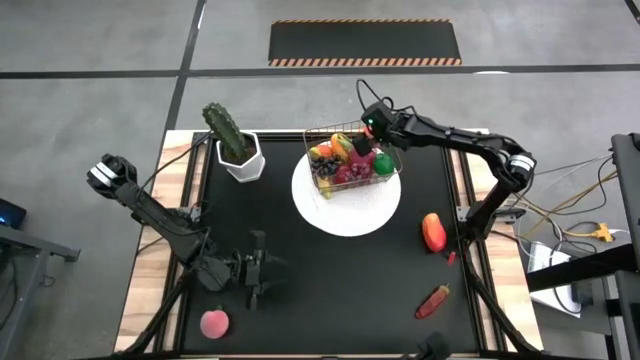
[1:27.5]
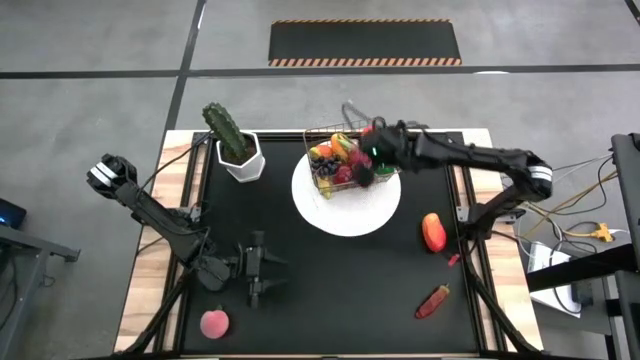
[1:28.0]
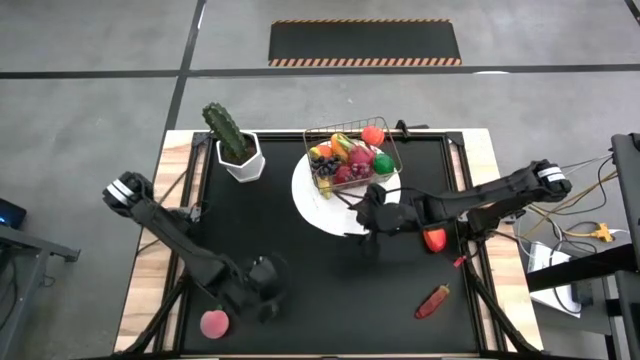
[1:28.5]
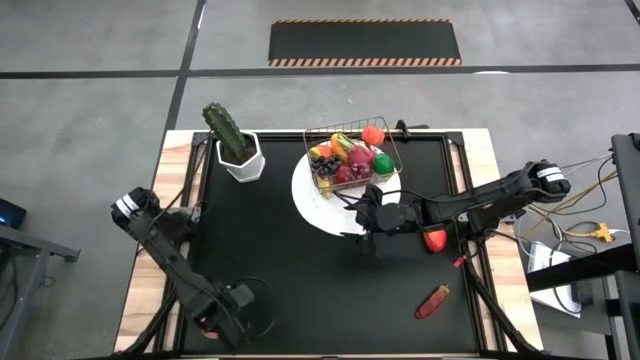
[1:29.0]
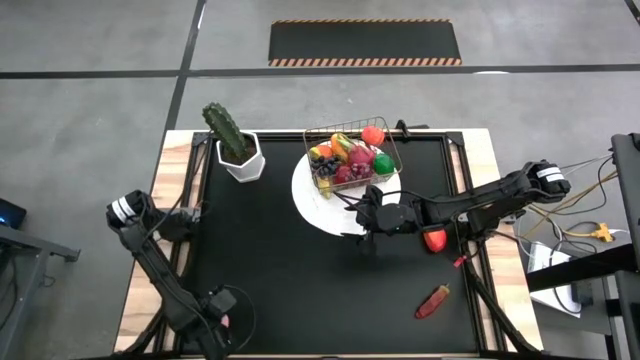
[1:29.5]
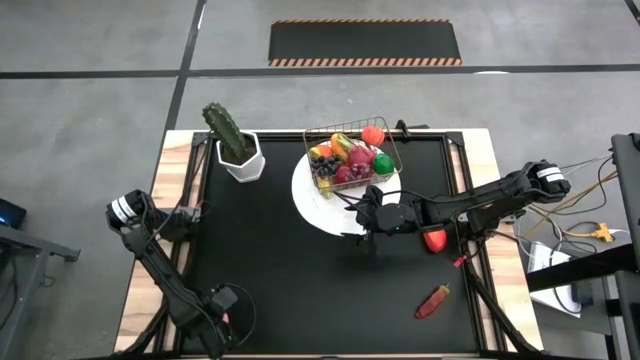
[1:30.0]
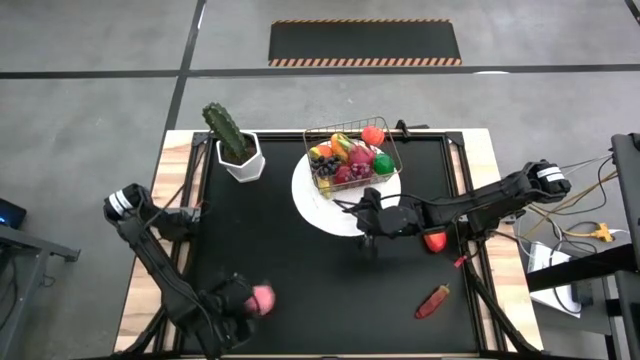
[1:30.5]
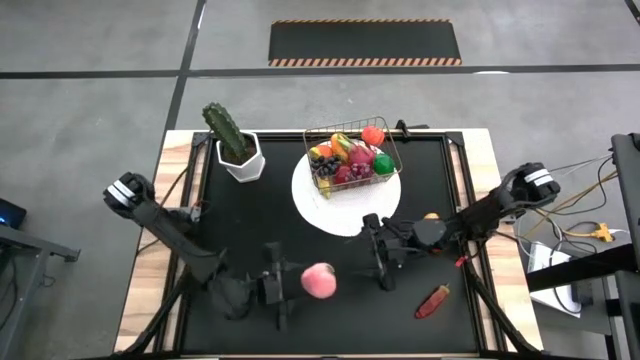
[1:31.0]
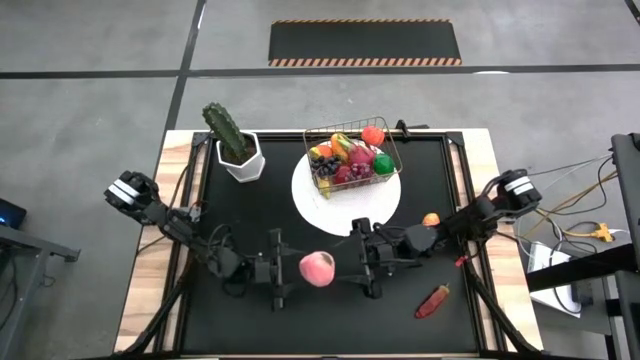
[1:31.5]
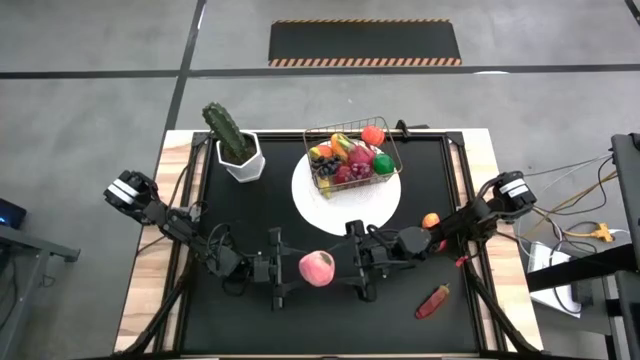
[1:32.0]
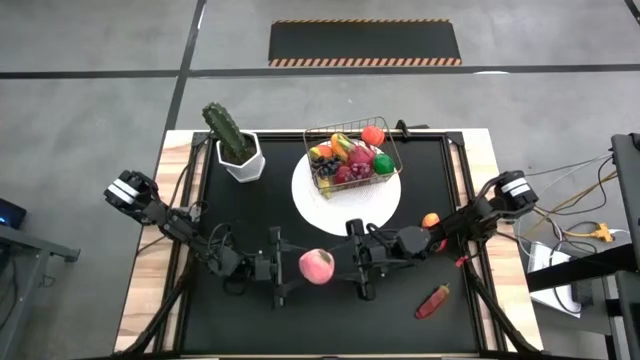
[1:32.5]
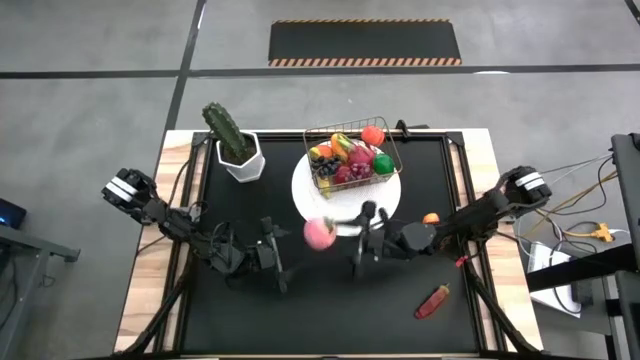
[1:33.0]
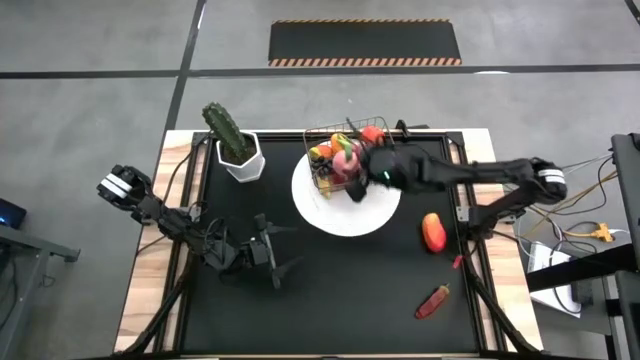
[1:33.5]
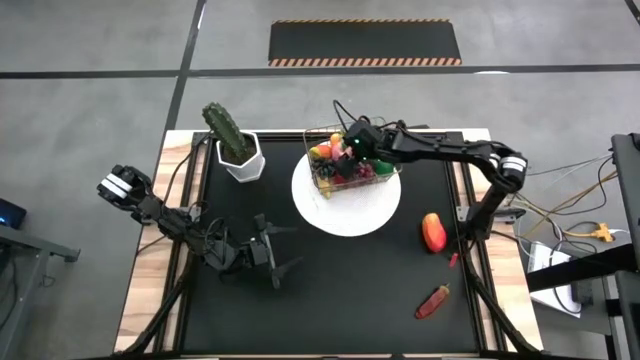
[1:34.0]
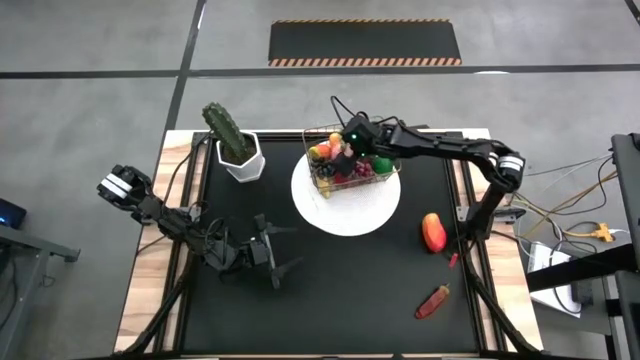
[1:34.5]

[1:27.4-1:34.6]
Task: Build produce basket
Put the pink peach into the wire basket

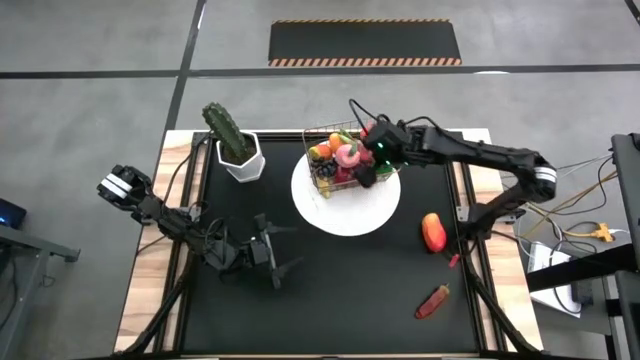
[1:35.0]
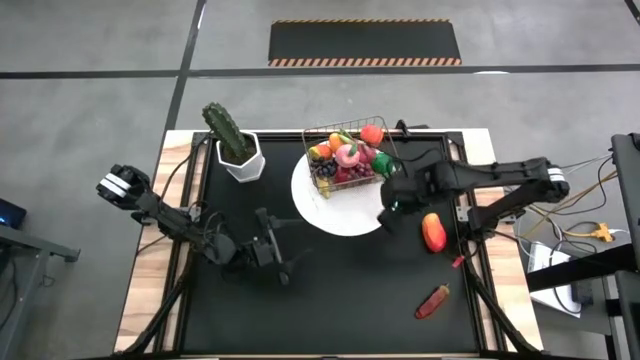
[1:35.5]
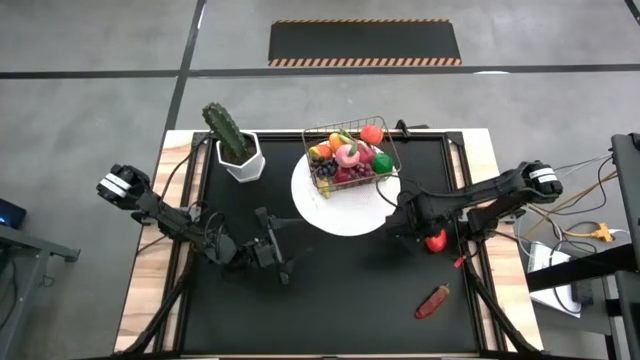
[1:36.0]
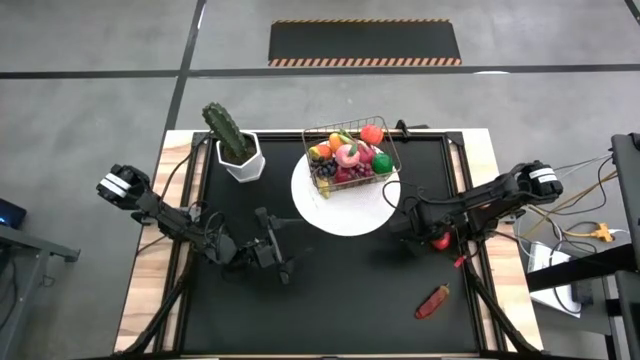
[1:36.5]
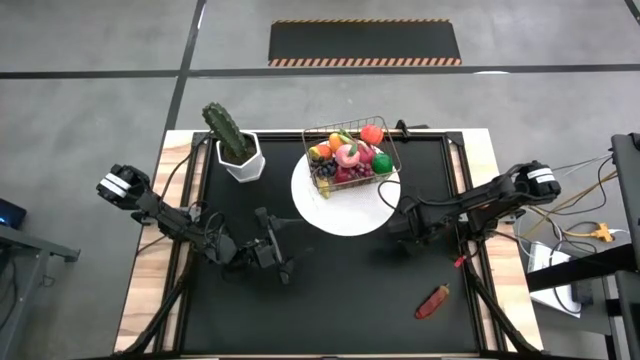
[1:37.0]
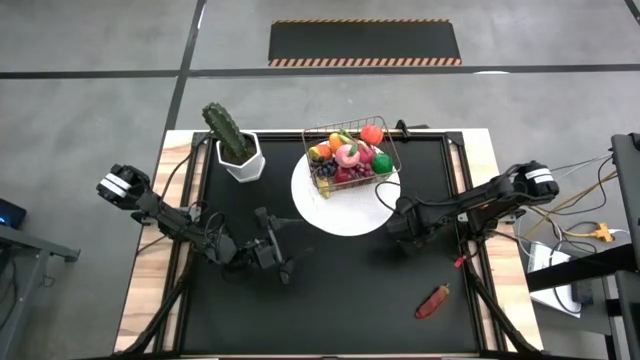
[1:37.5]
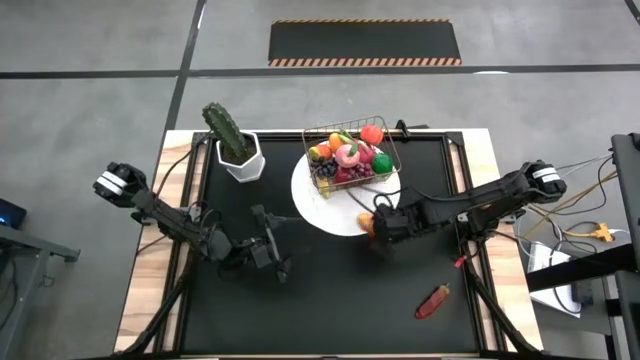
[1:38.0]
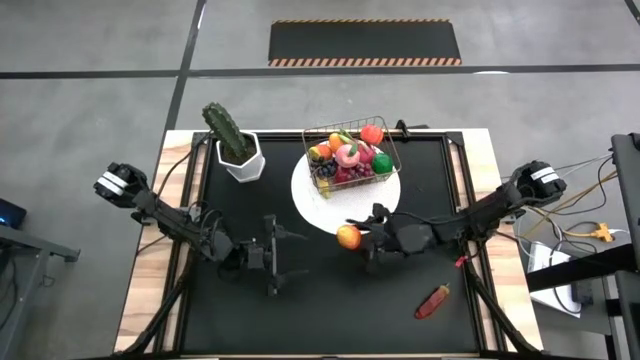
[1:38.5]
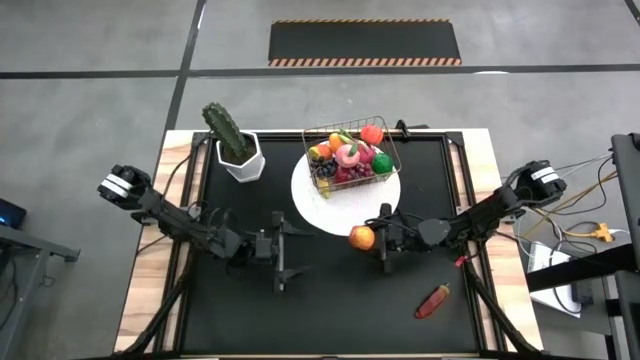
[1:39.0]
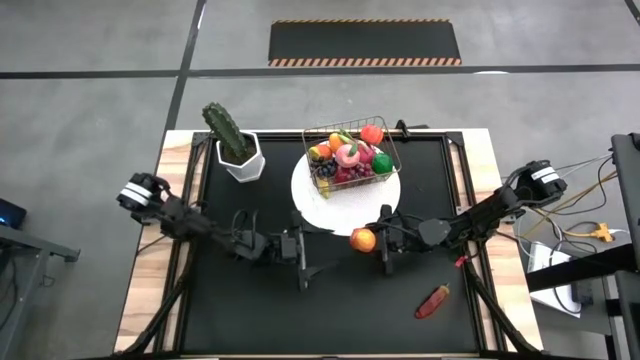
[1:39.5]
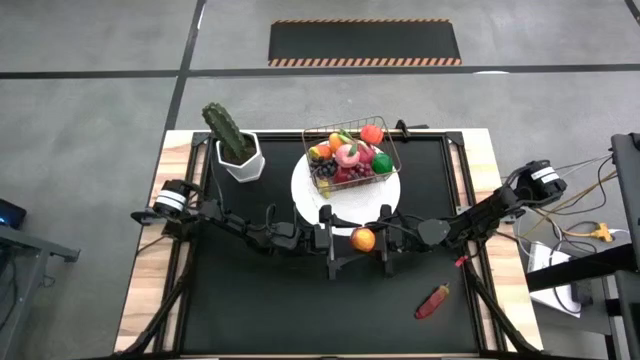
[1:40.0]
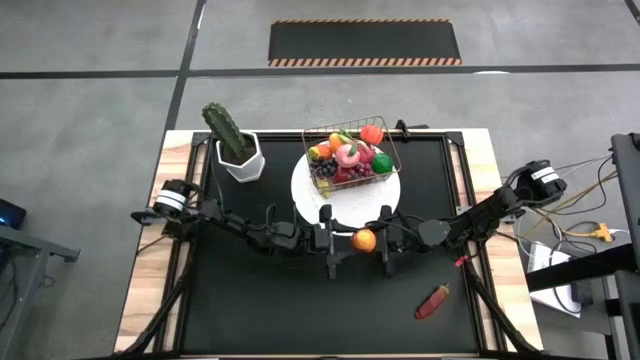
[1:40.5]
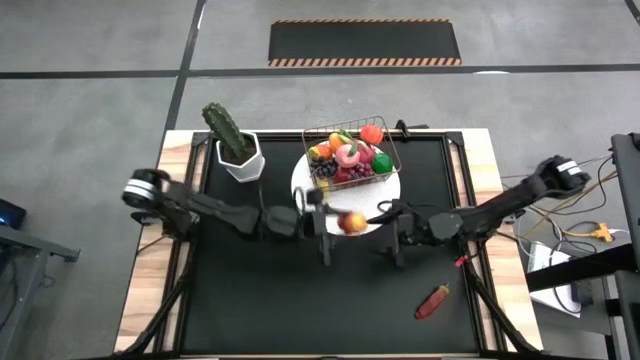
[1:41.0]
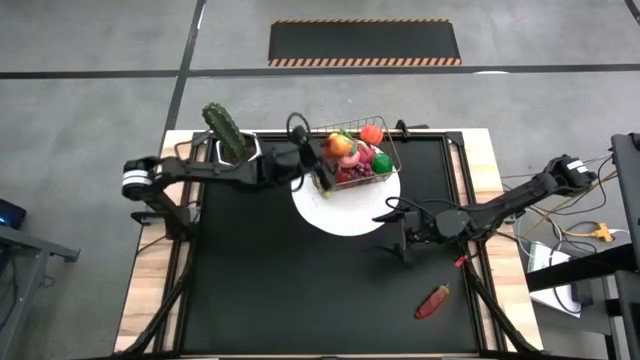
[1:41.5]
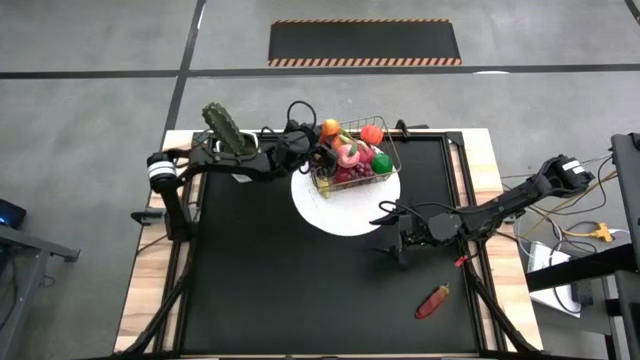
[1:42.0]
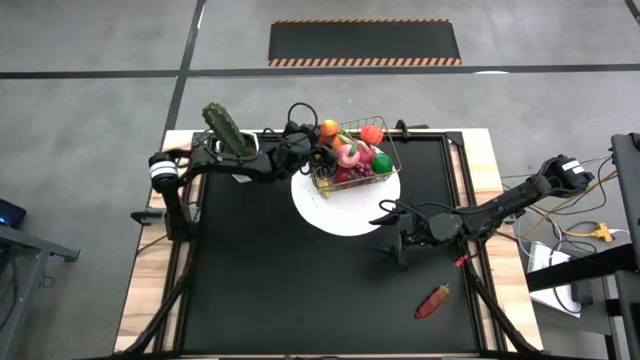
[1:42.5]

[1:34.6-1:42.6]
Put the red mango into the wire basket

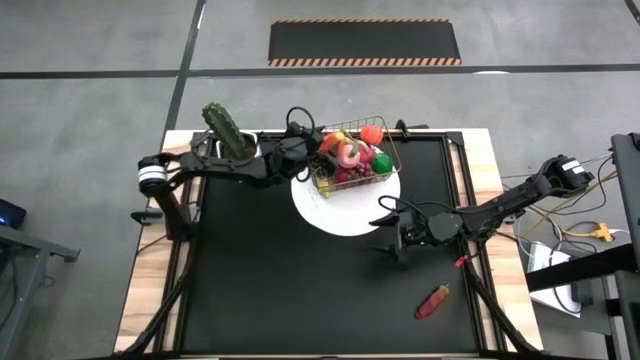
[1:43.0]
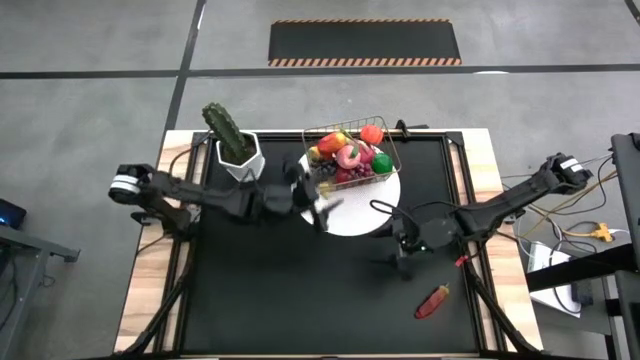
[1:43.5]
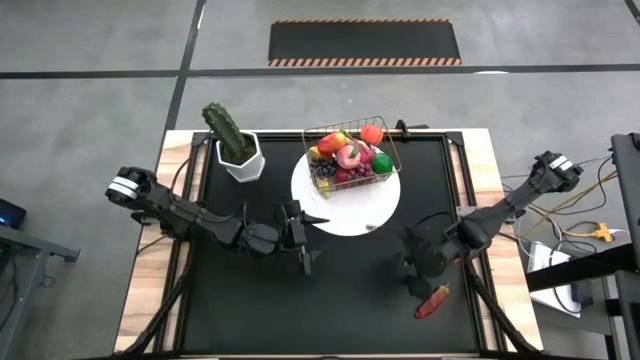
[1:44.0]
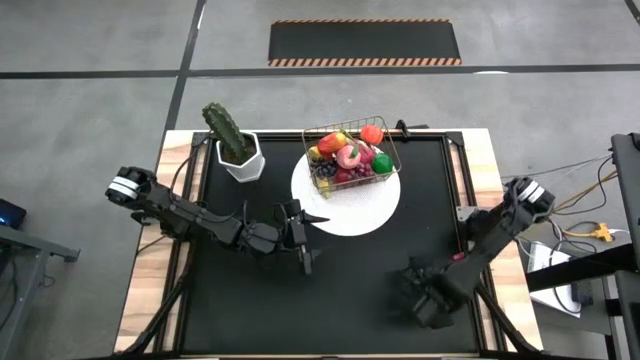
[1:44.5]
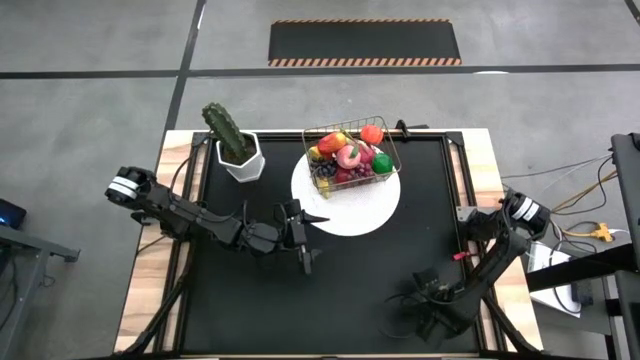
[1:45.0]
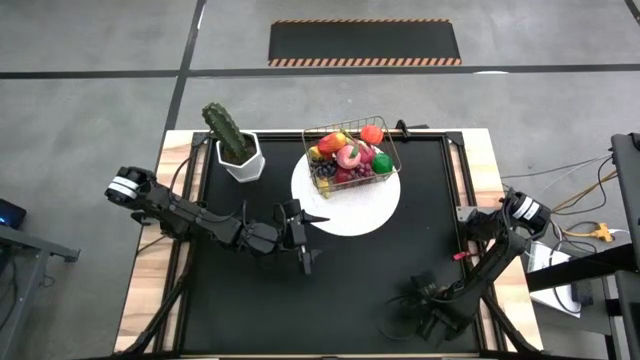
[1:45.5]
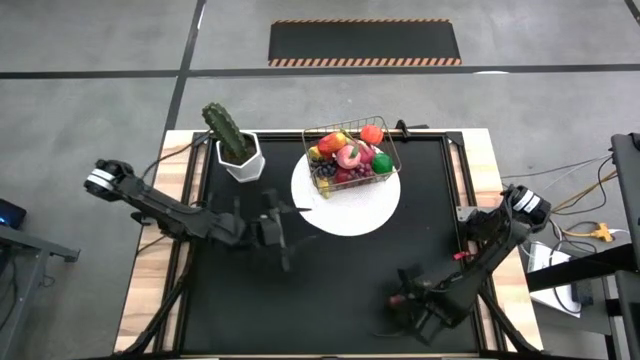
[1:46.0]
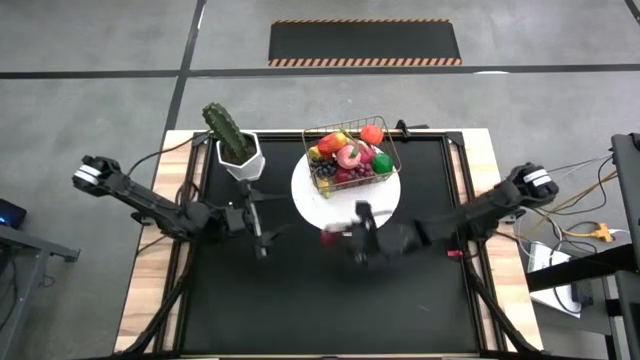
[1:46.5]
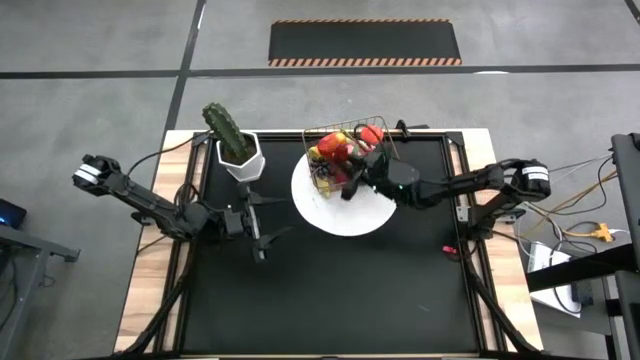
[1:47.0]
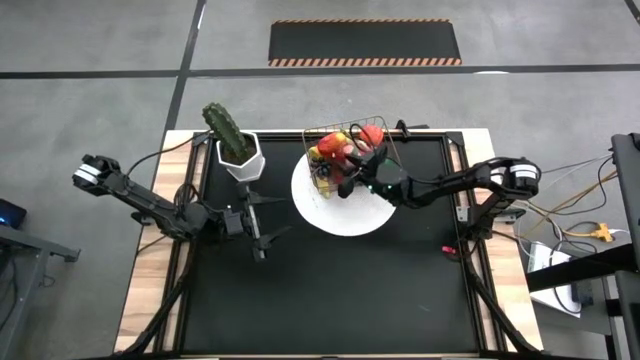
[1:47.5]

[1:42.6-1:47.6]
Put the red chili pepper into the wire basket

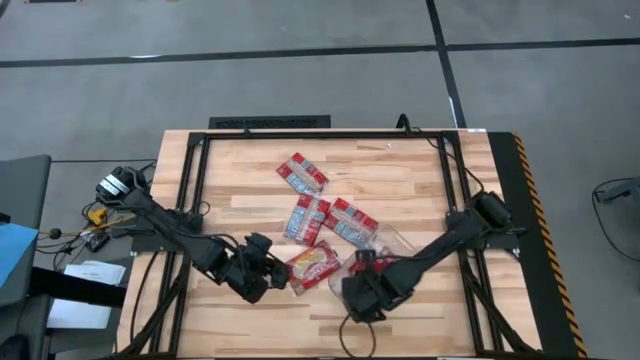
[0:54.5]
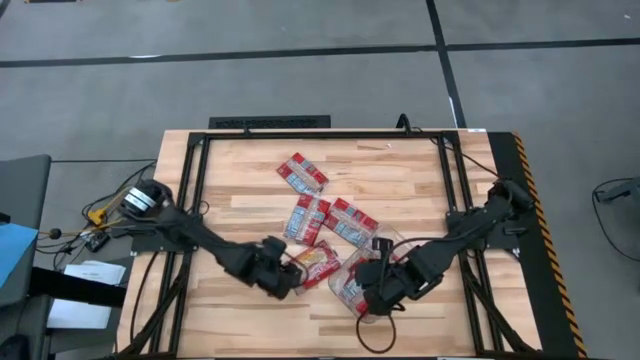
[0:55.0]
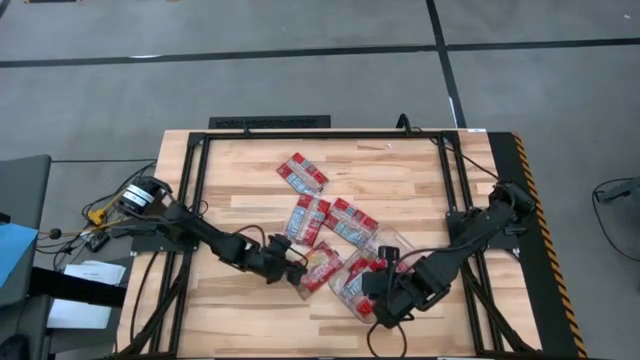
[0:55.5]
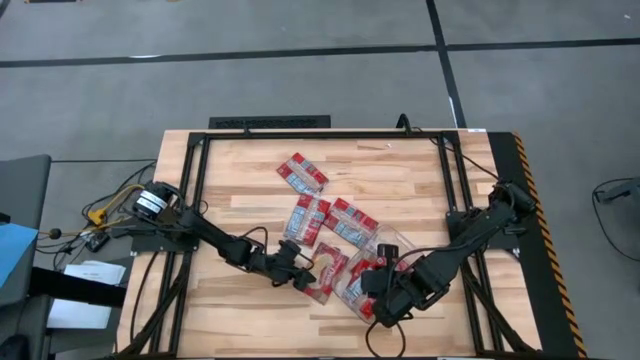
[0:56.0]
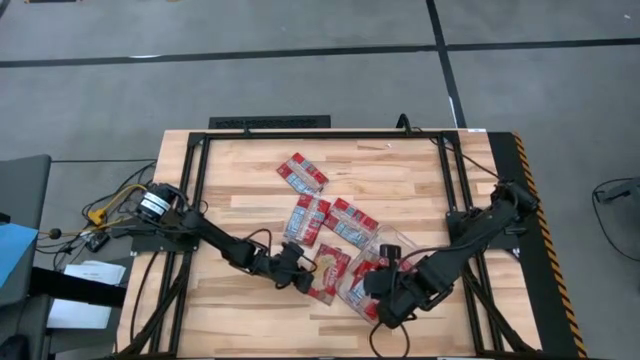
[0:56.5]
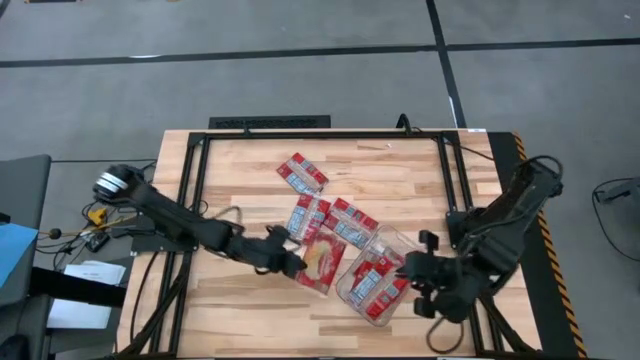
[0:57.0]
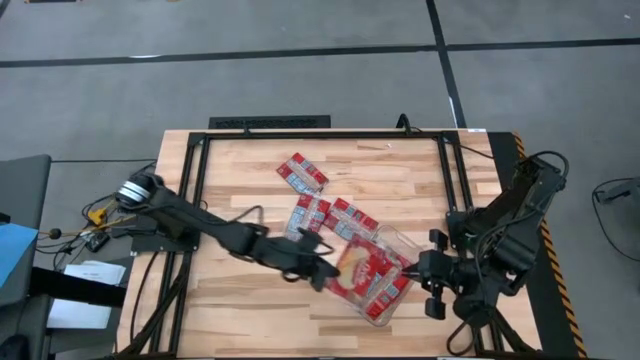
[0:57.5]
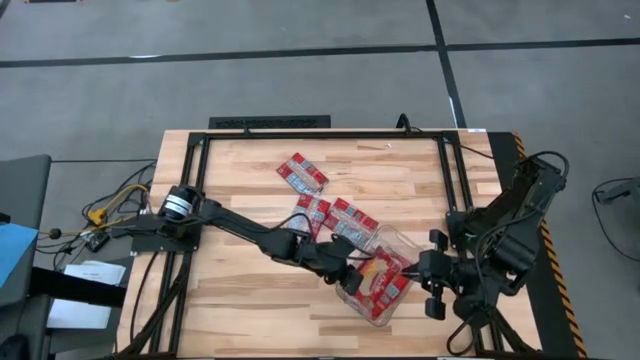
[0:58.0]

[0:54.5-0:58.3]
Task: Sort popcorn bags into baskets
Put the red popcorn bag into the transparent bin
